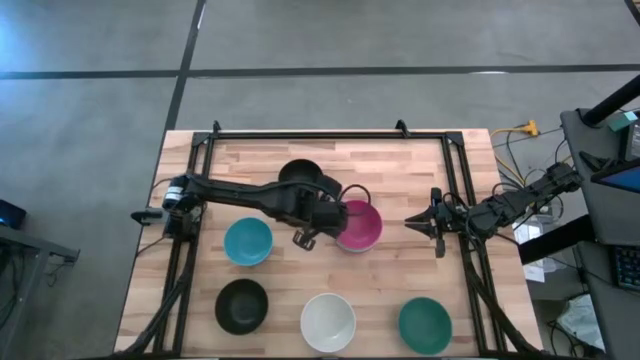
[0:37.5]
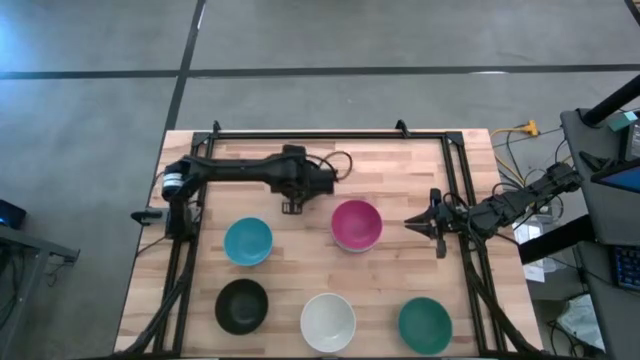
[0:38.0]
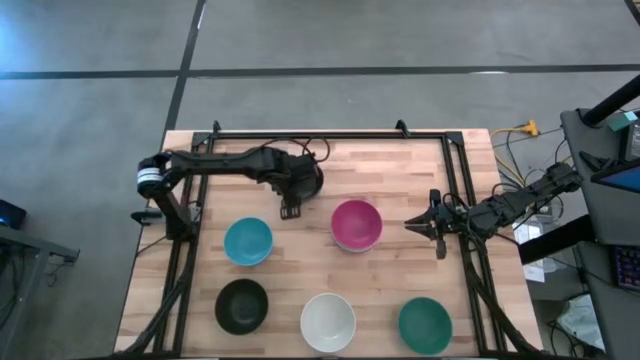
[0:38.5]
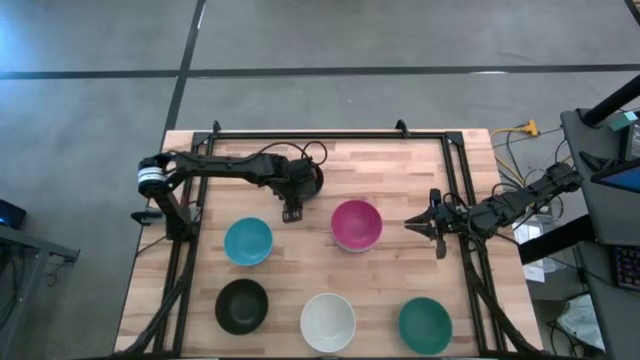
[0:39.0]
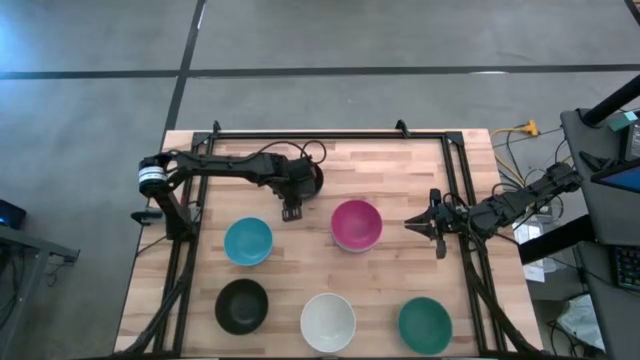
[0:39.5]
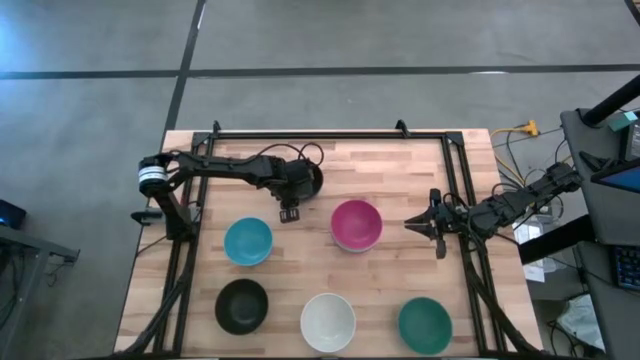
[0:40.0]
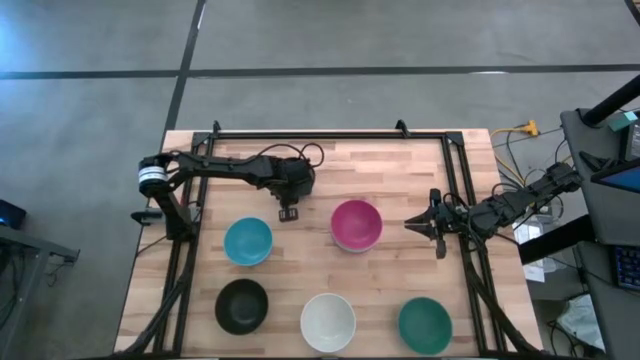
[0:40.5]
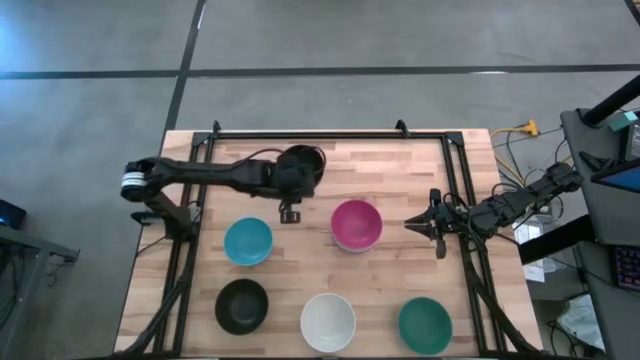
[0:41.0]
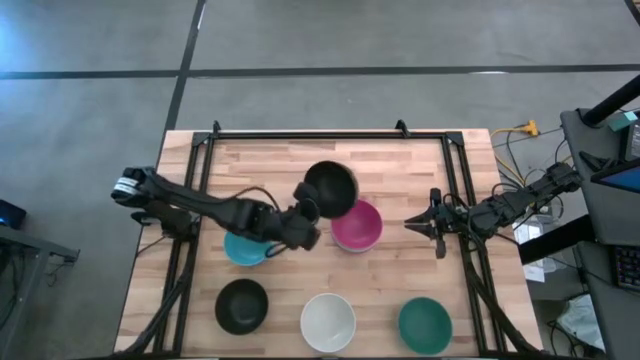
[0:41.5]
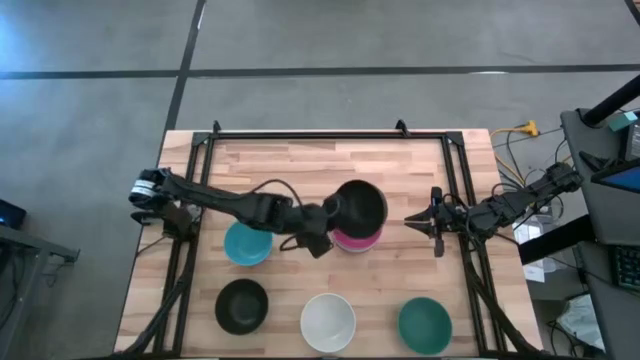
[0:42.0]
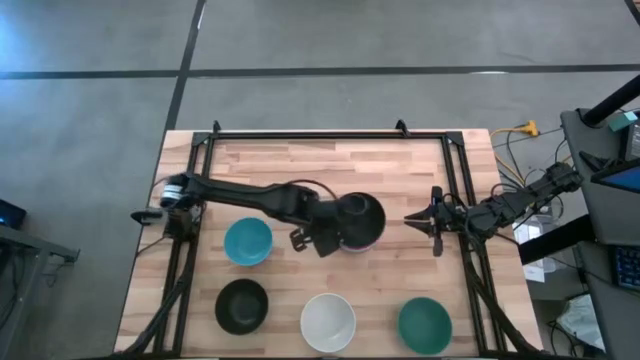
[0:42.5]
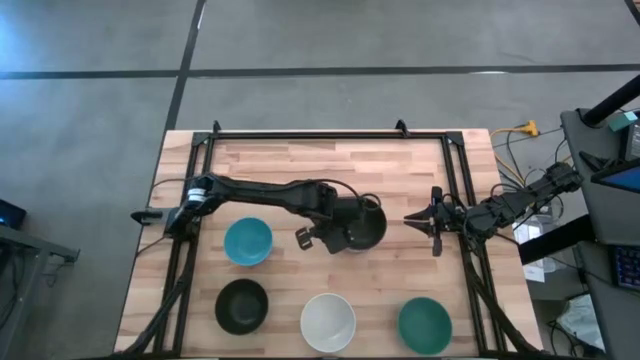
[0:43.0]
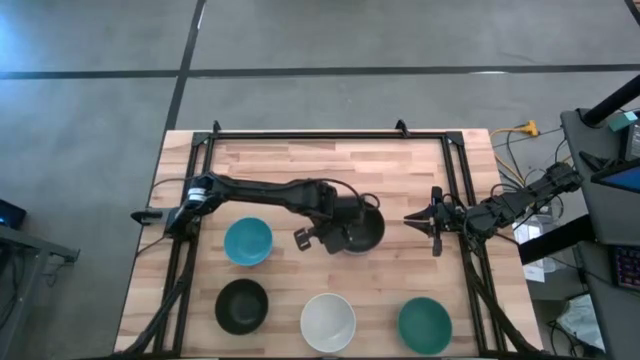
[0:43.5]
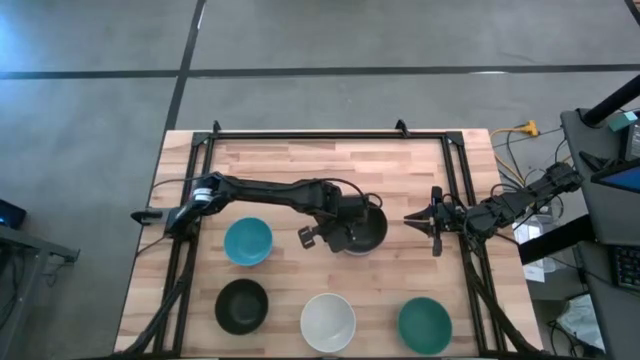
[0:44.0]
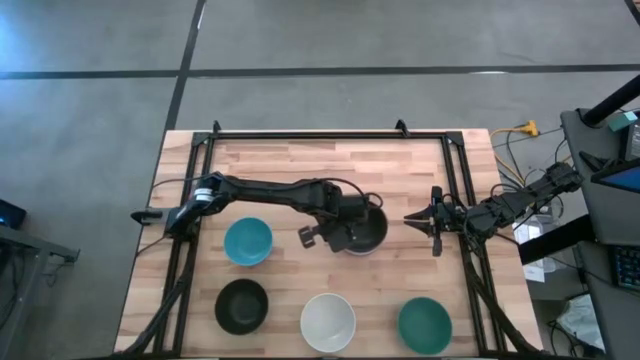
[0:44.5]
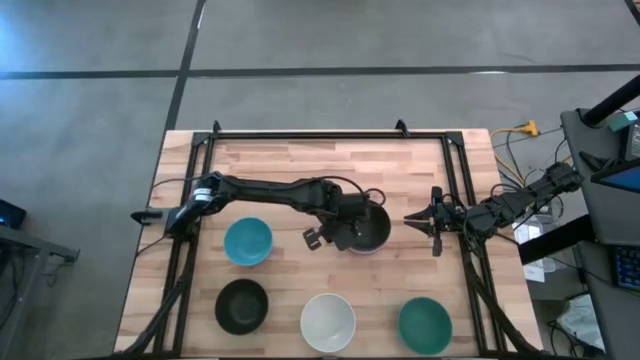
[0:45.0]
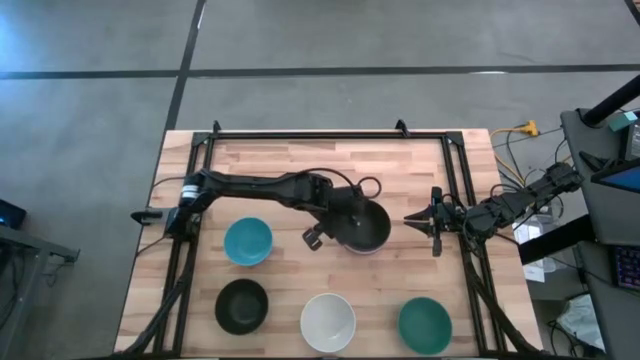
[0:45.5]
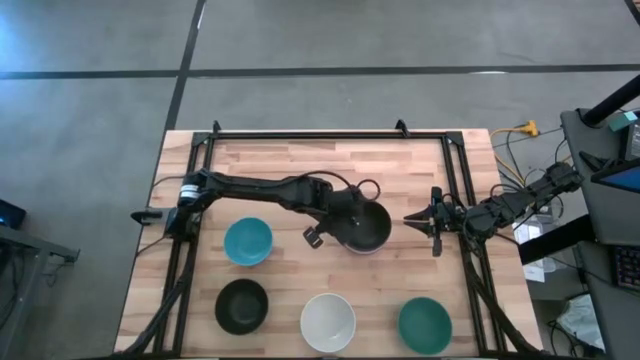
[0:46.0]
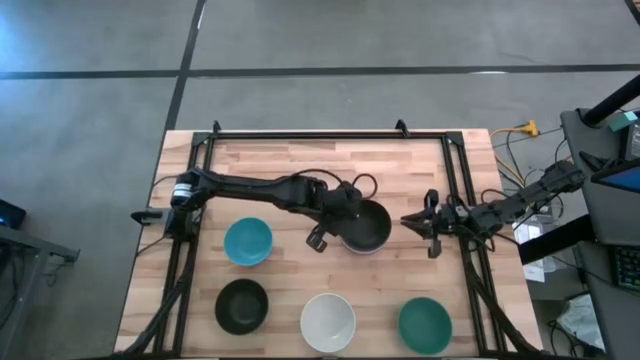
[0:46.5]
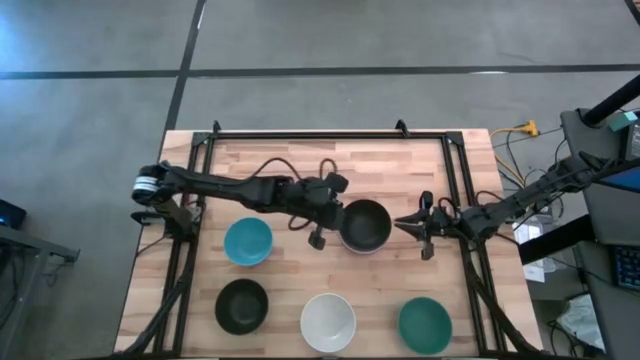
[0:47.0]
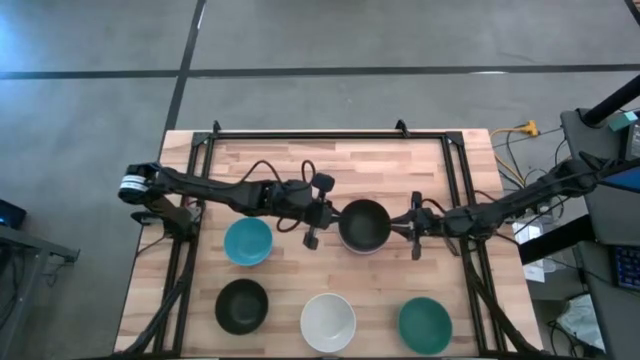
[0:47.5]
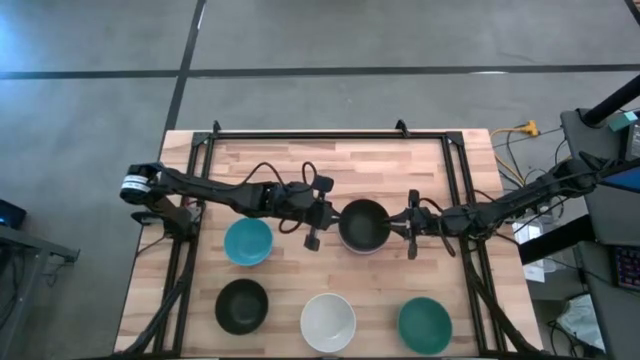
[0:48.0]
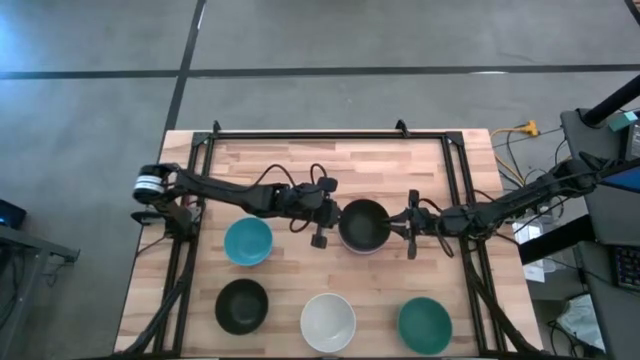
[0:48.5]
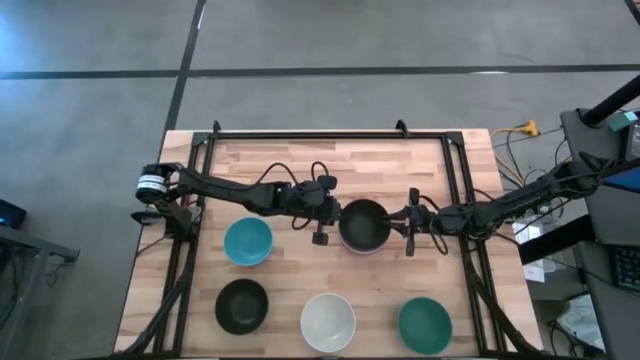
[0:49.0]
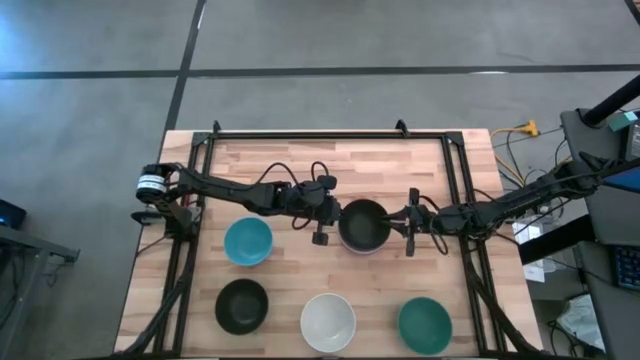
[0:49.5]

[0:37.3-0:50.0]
Task: Nest bowls inside each other
Stack the top black bowl on the pink bowl

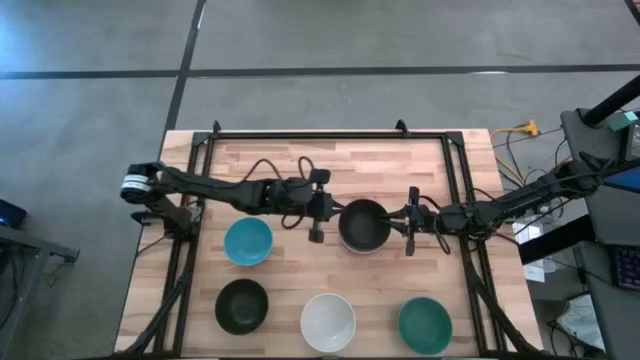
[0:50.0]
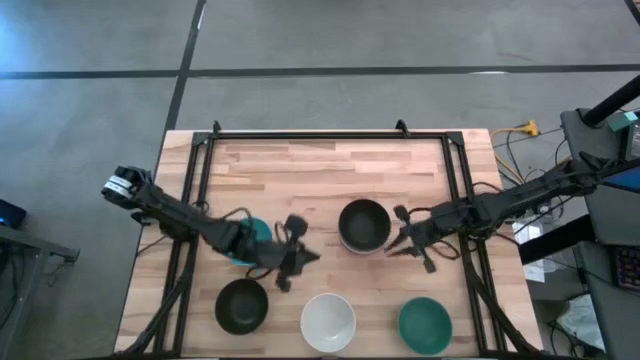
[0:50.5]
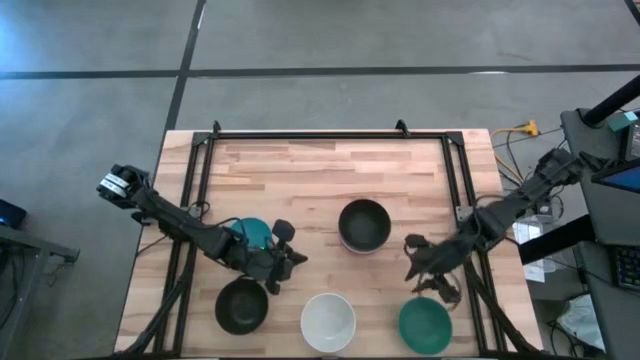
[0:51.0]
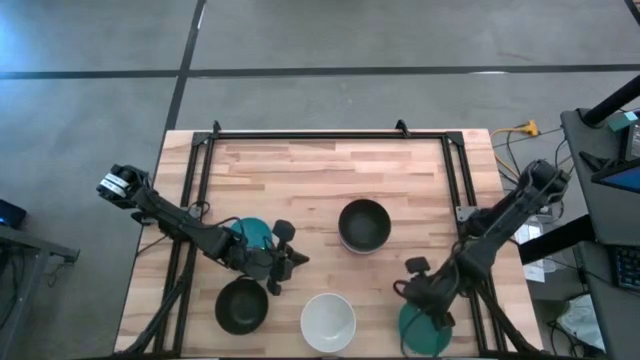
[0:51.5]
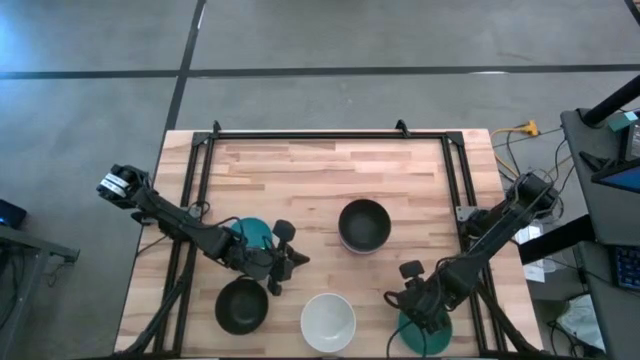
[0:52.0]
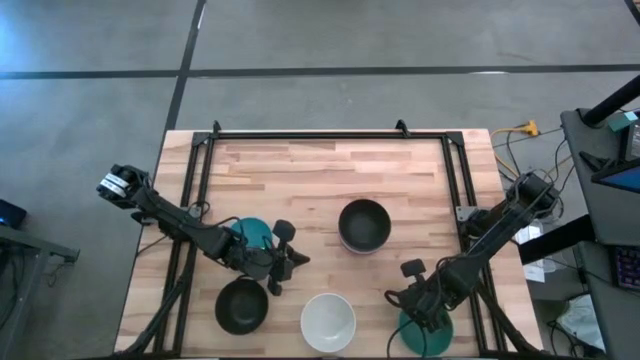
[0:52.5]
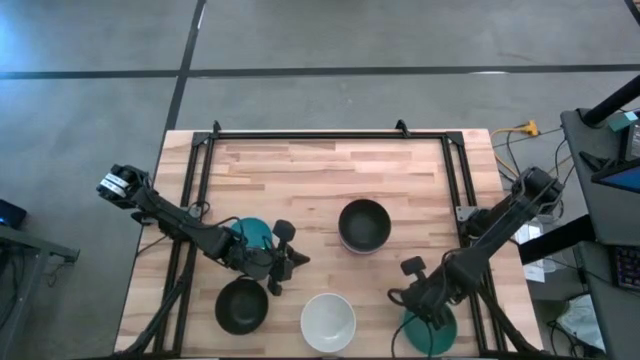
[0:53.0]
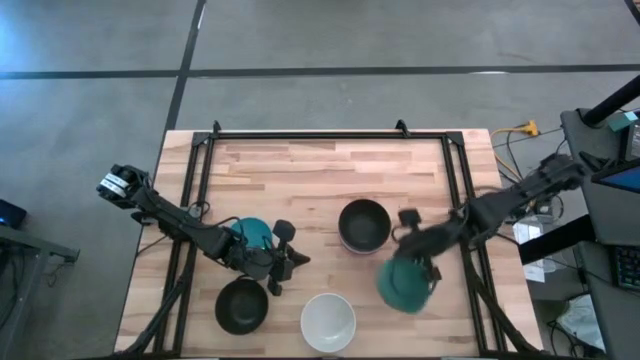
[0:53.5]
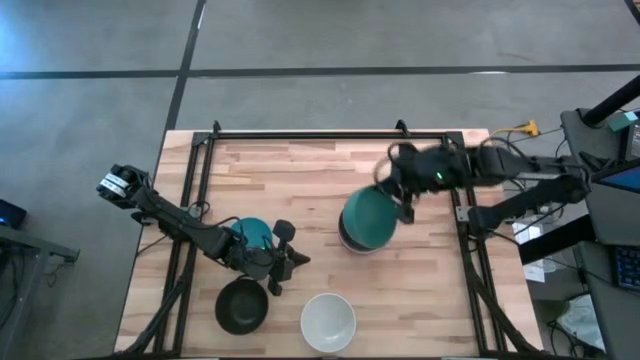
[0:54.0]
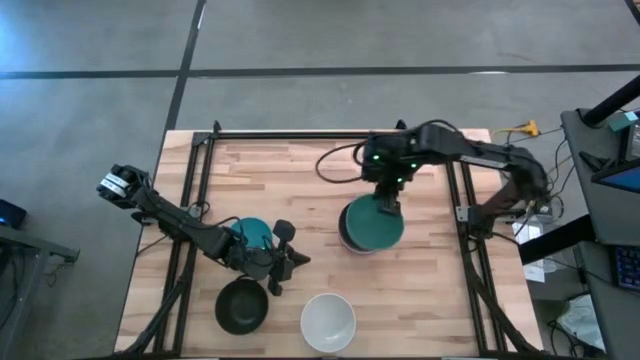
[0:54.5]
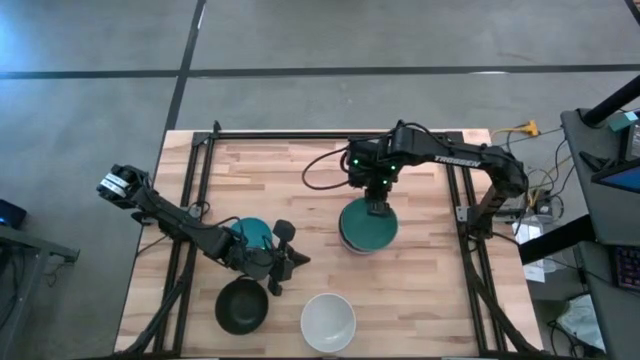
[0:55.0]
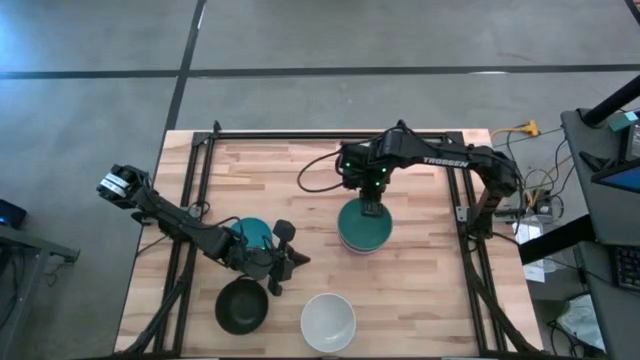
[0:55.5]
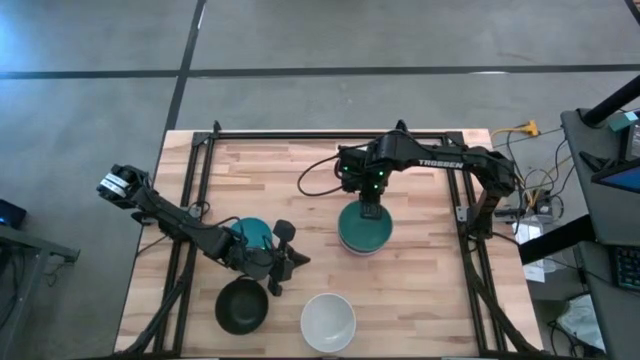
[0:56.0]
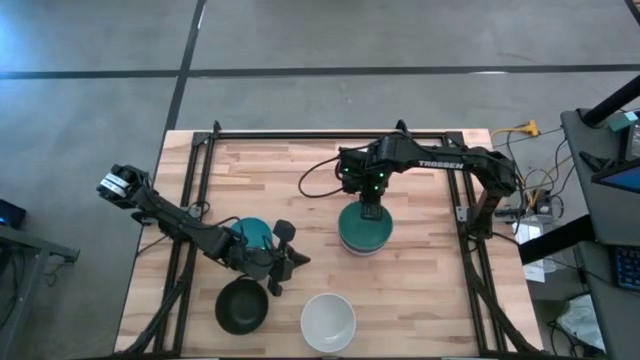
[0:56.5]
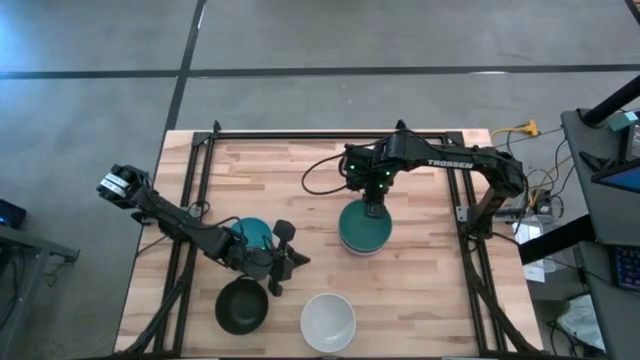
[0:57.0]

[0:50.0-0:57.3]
Stack the green bowl on the top black bowl
